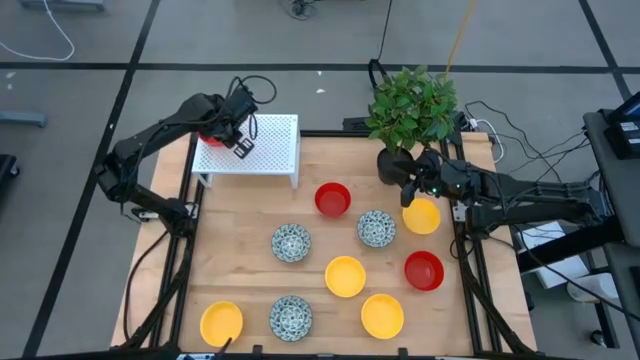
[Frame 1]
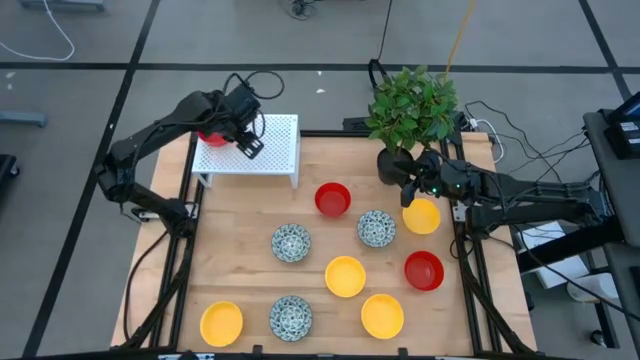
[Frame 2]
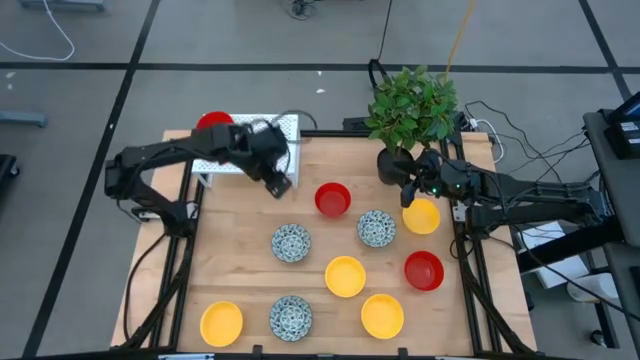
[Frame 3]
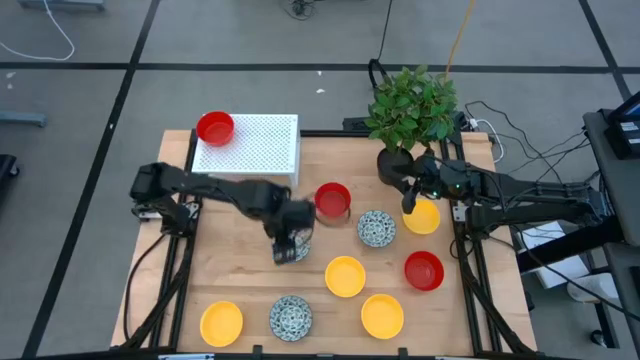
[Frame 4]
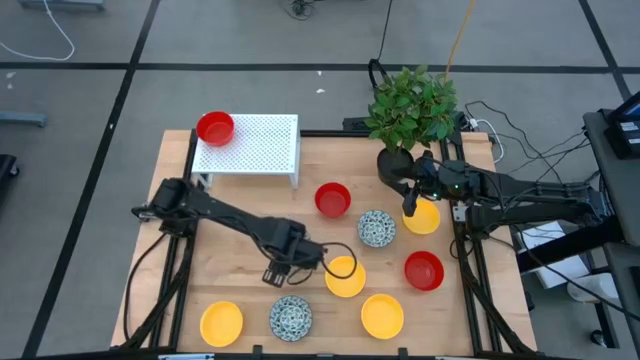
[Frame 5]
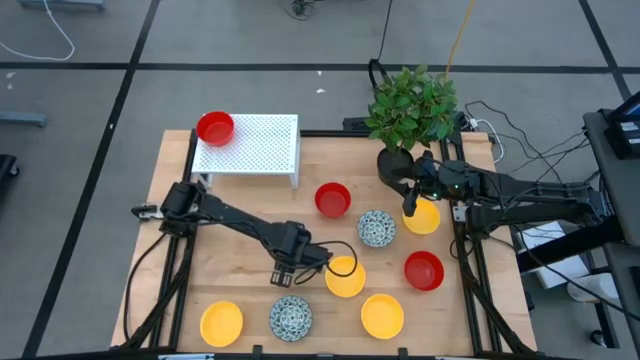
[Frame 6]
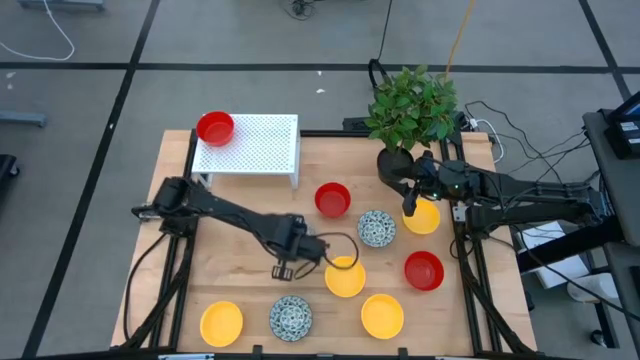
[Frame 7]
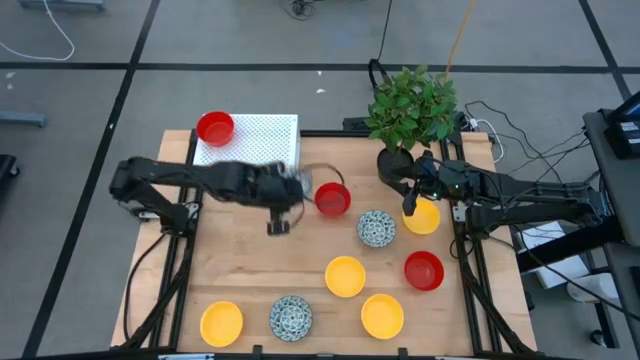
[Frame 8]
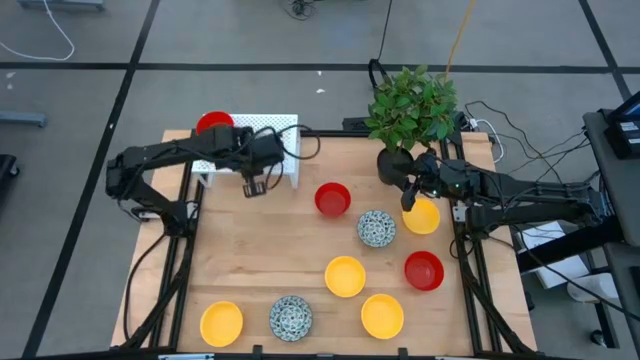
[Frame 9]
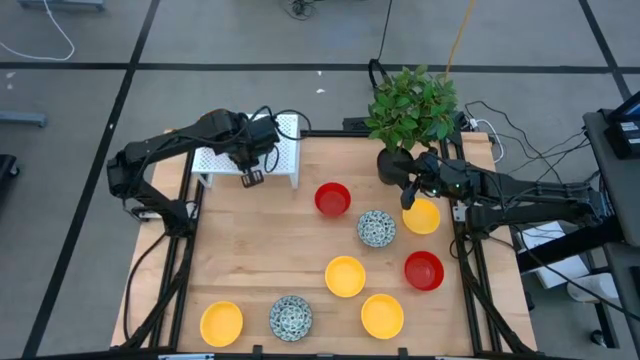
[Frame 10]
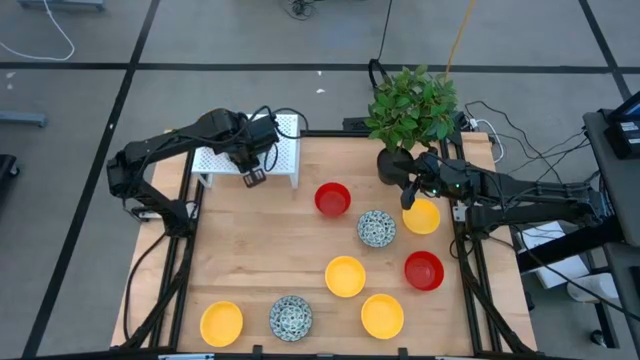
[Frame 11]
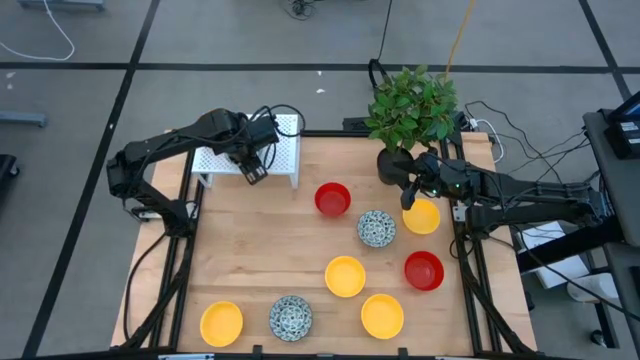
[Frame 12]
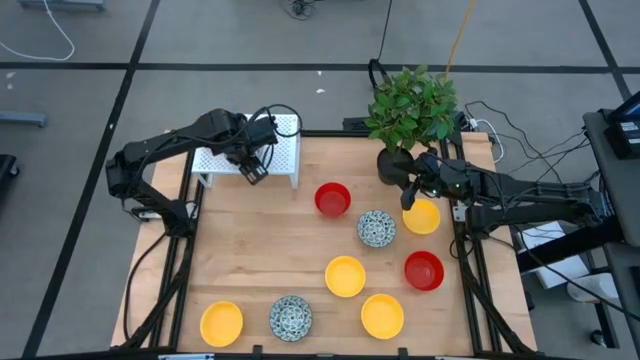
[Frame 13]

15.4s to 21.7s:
Task: Pick & Place Mini bowls
Put the blue bowl on the shelf

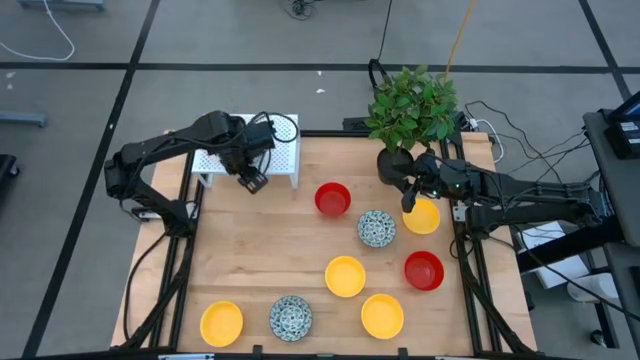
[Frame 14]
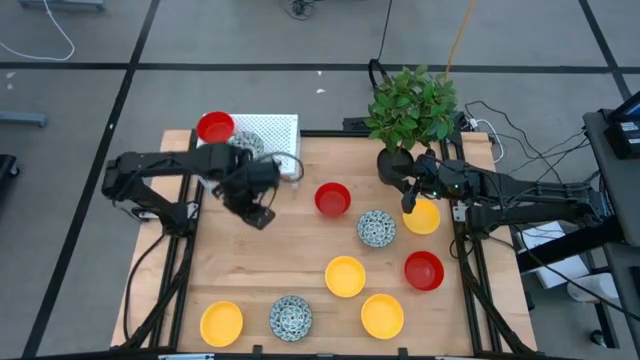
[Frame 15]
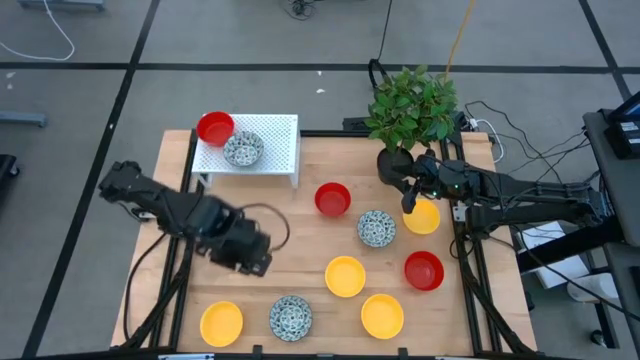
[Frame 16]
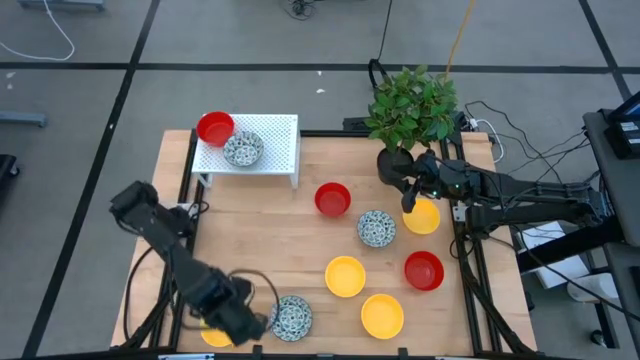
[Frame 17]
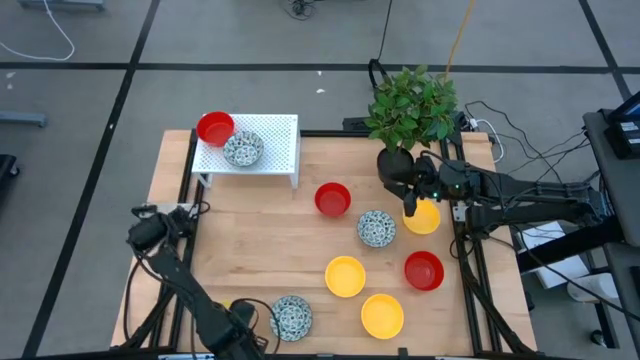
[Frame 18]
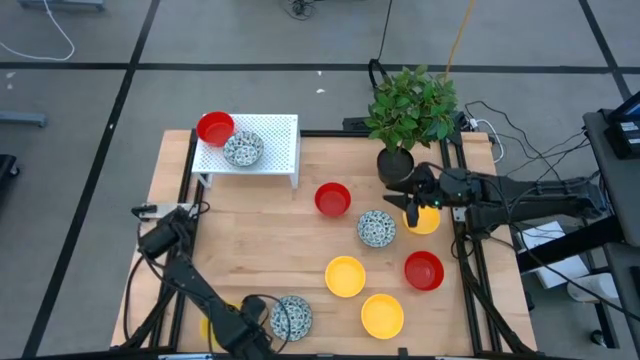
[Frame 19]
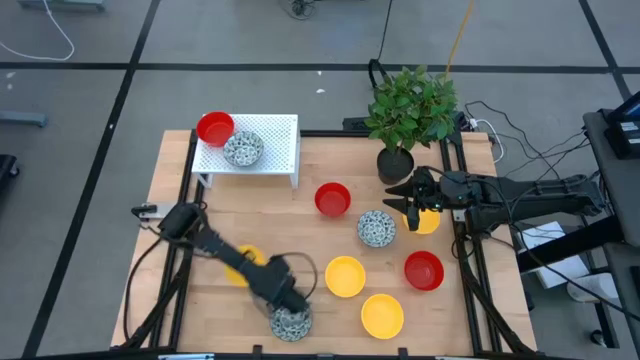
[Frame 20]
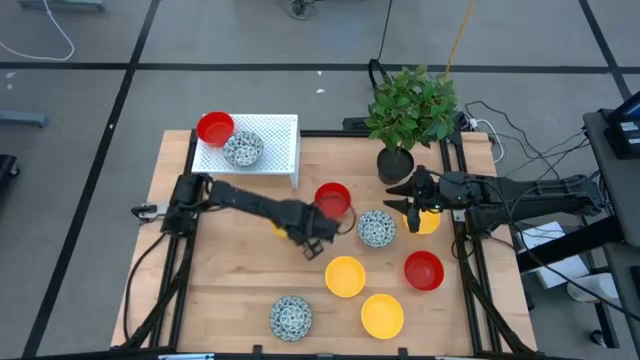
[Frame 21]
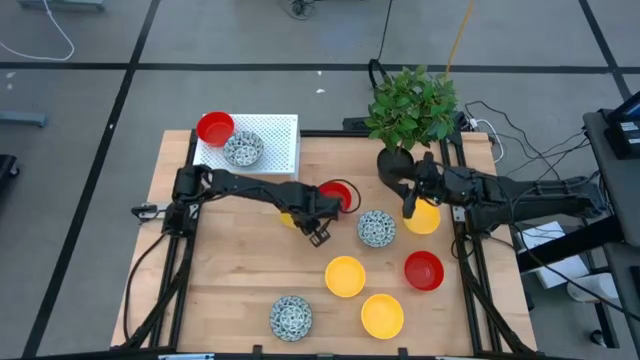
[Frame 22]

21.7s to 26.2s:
Move the yellow bowl to the center of the table

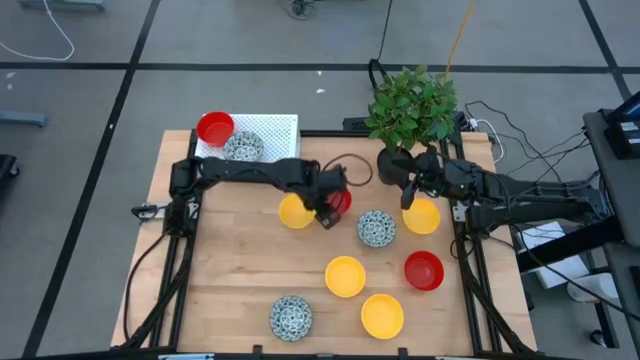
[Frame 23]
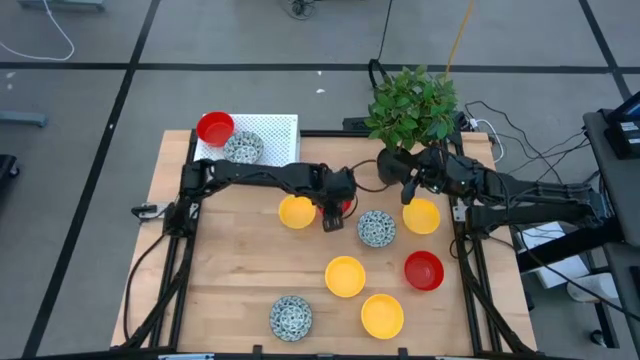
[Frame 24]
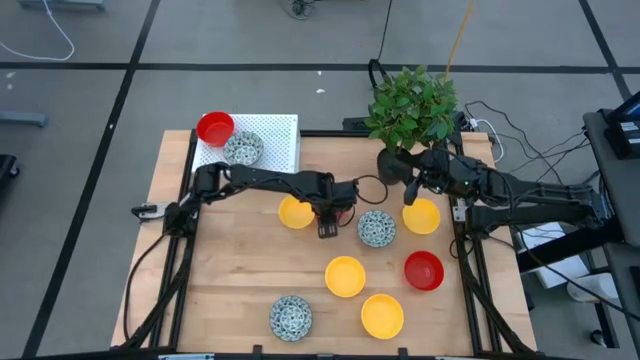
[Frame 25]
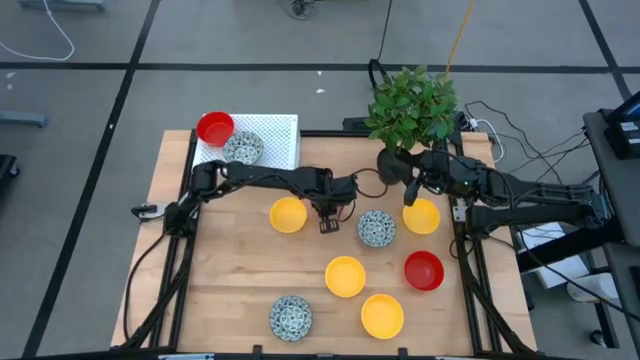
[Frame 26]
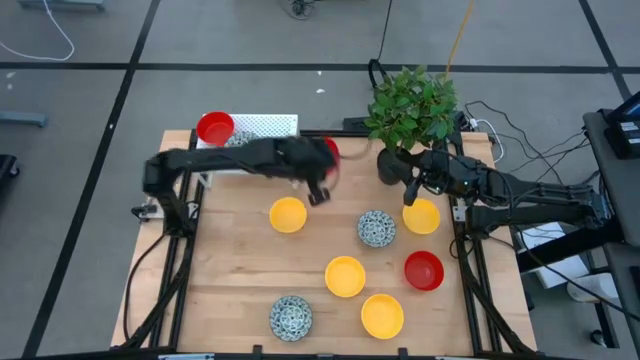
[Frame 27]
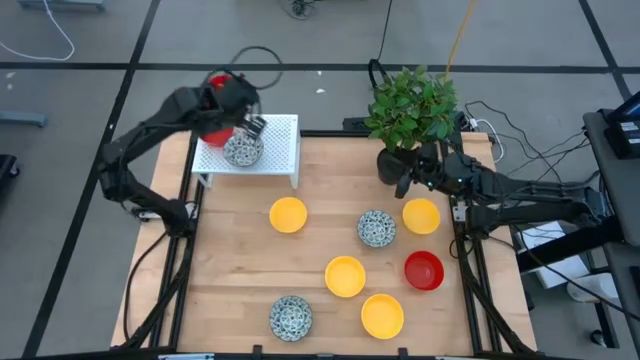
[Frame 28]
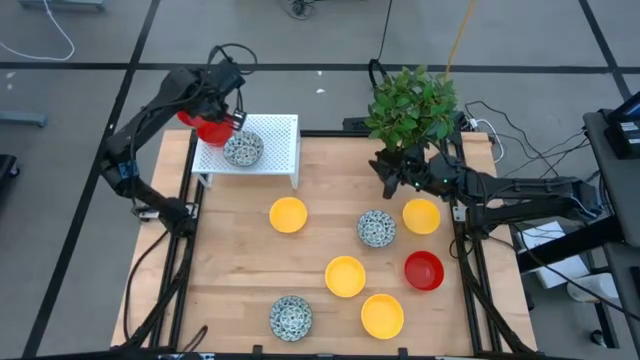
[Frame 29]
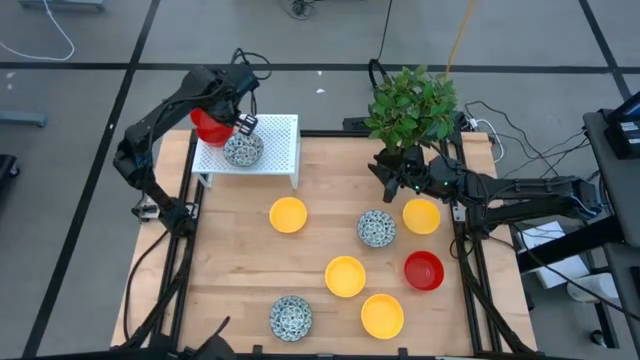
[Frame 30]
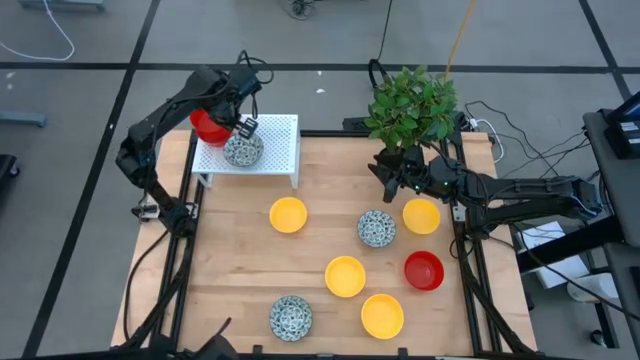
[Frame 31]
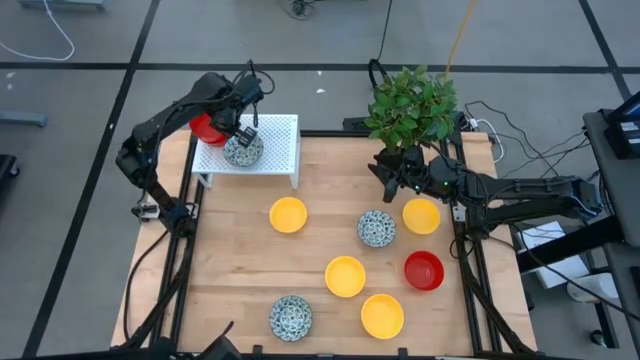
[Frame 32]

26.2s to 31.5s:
Stack the red bowl on the red bowl on the shelf

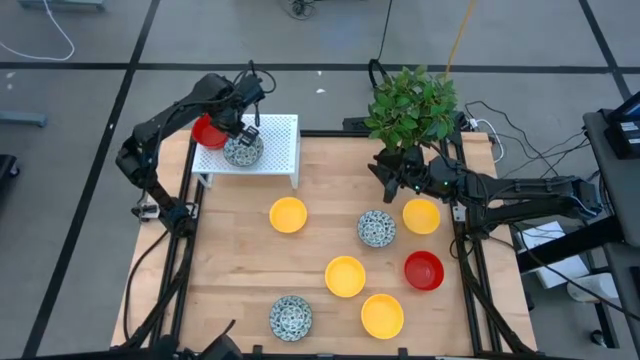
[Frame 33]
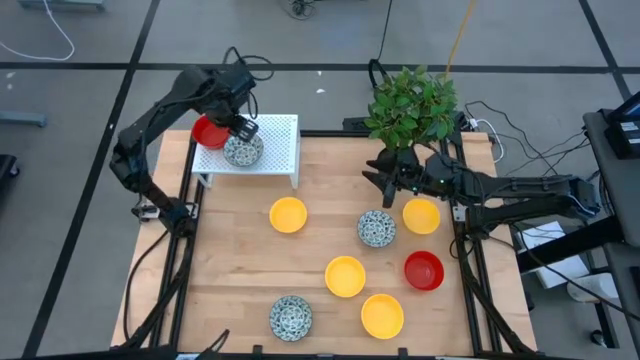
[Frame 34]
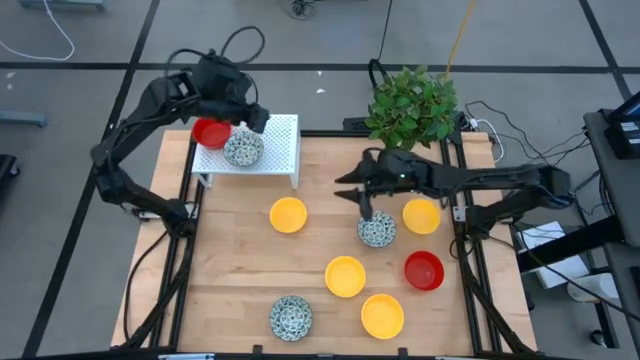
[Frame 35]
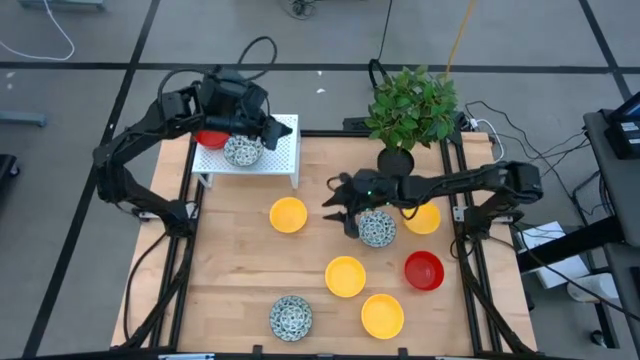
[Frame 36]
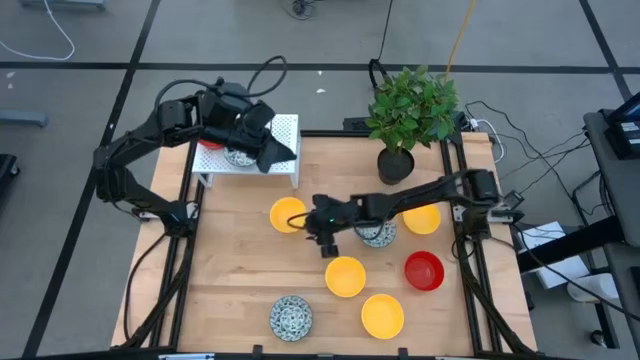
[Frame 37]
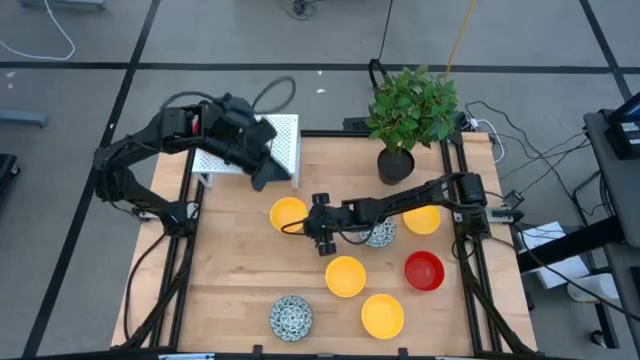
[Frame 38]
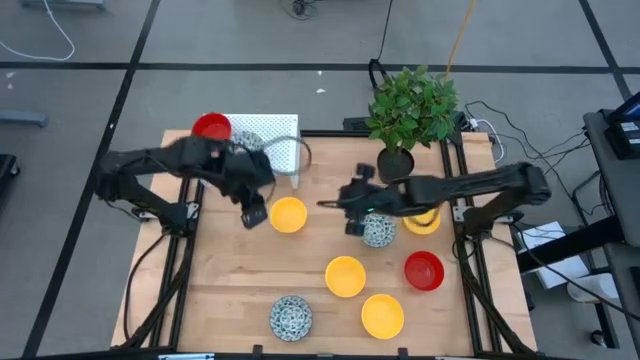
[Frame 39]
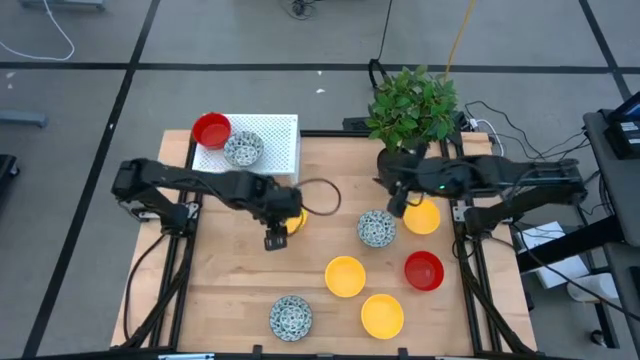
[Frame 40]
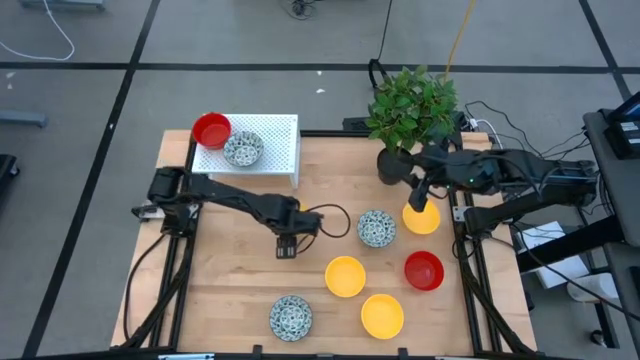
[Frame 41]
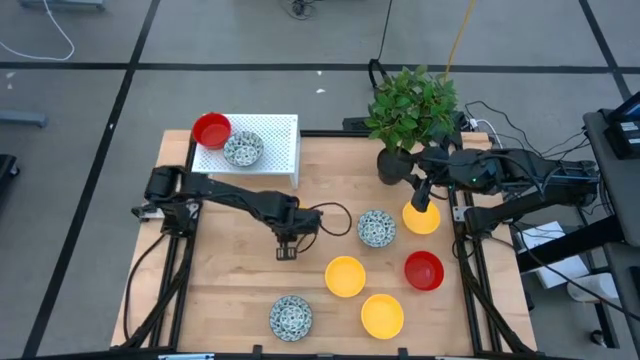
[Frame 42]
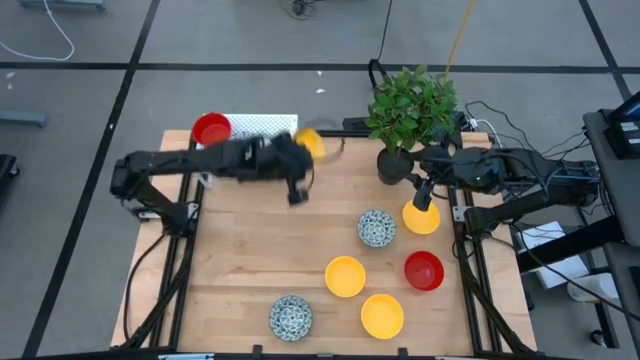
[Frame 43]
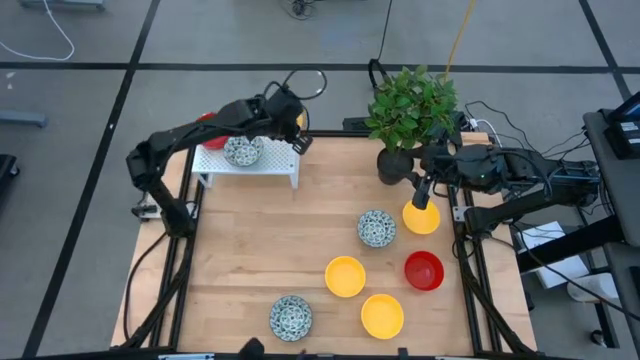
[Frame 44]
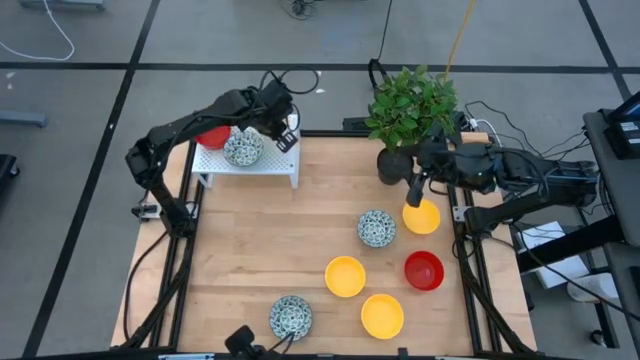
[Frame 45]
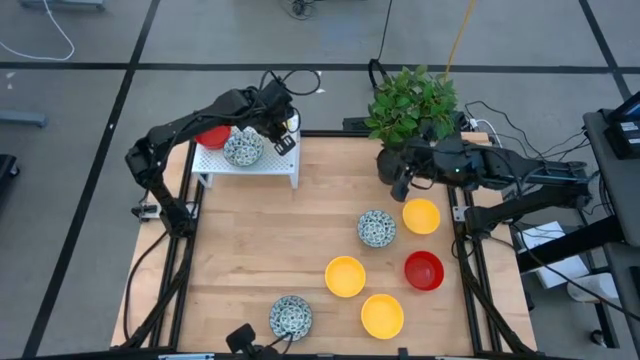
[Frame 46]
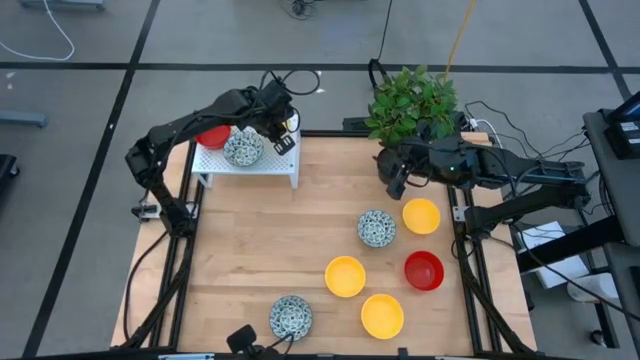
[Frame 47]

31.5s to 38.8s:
Put the yellow bowl on the shelf
